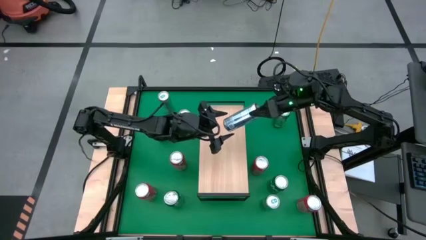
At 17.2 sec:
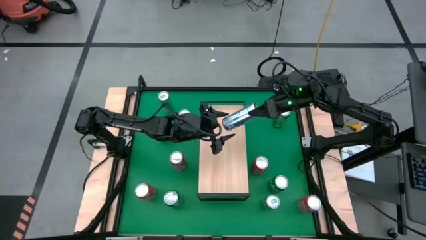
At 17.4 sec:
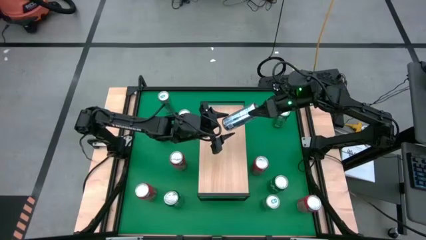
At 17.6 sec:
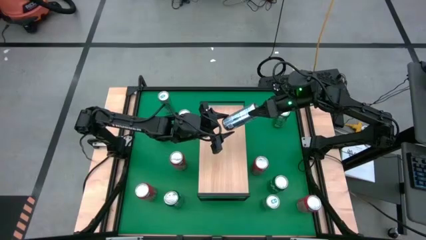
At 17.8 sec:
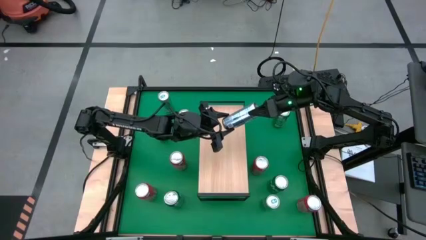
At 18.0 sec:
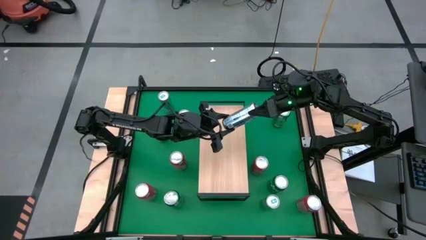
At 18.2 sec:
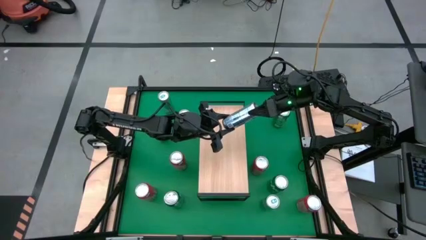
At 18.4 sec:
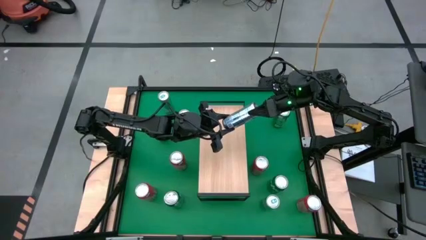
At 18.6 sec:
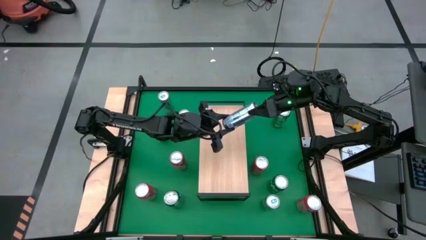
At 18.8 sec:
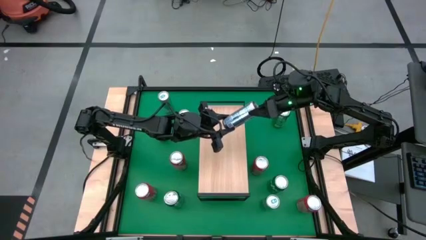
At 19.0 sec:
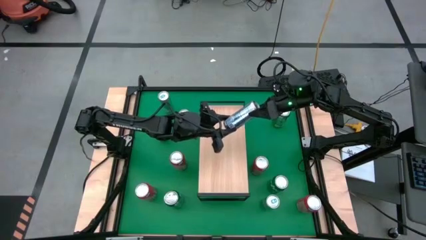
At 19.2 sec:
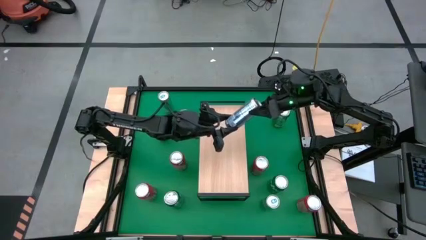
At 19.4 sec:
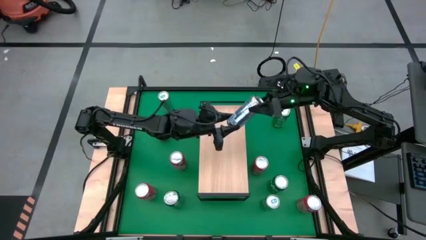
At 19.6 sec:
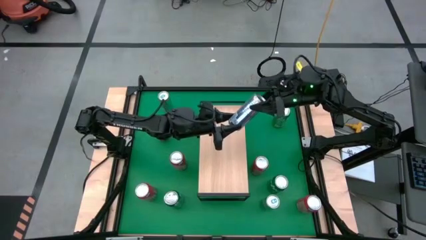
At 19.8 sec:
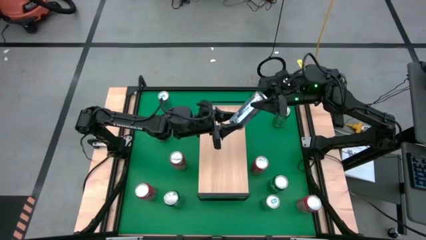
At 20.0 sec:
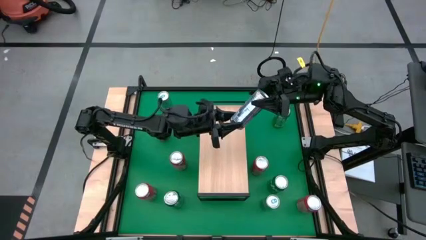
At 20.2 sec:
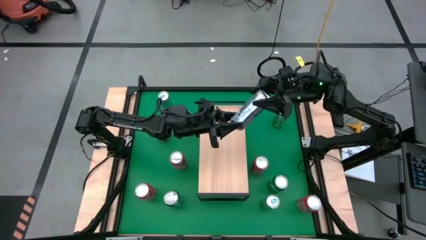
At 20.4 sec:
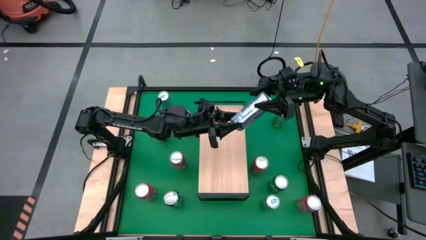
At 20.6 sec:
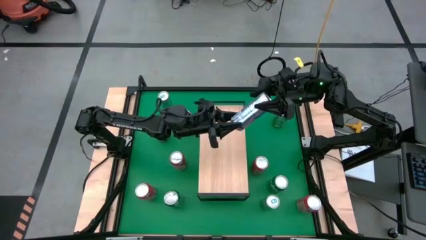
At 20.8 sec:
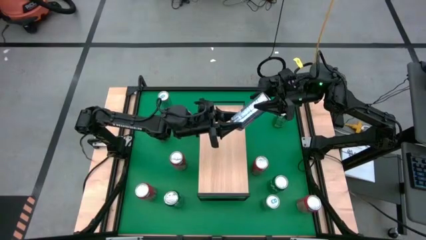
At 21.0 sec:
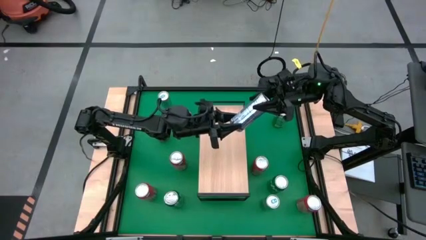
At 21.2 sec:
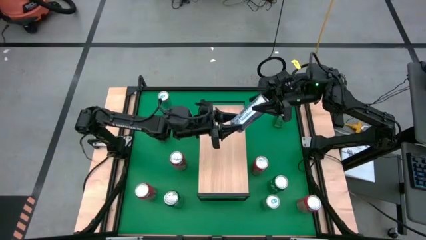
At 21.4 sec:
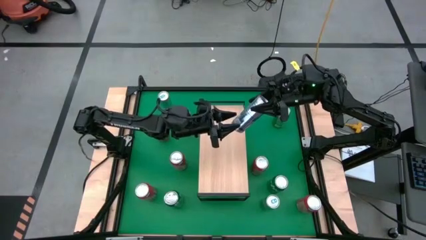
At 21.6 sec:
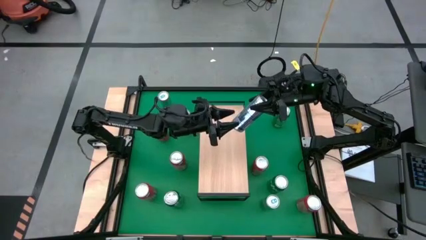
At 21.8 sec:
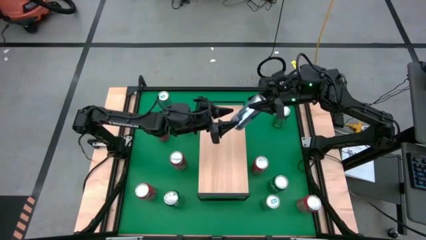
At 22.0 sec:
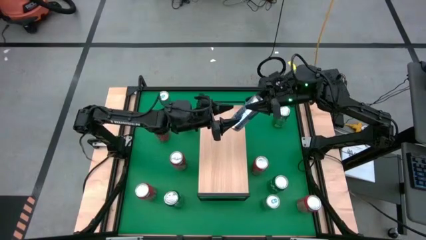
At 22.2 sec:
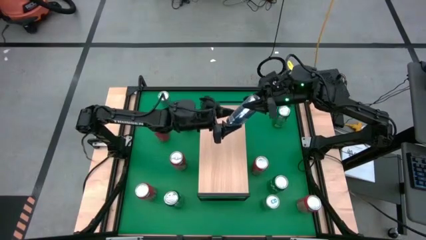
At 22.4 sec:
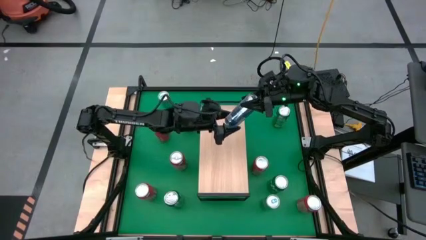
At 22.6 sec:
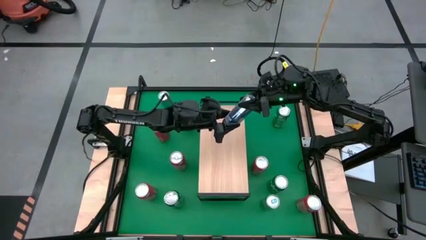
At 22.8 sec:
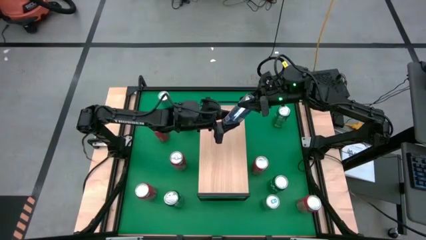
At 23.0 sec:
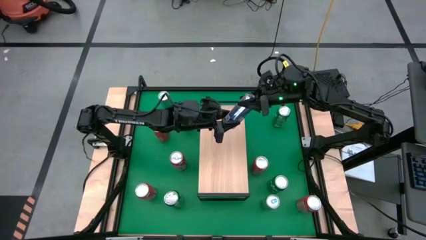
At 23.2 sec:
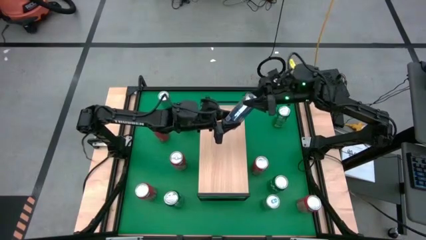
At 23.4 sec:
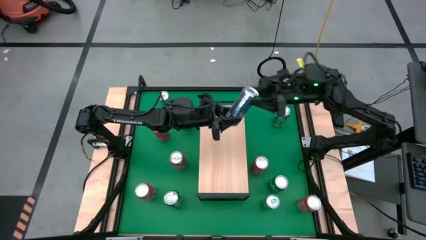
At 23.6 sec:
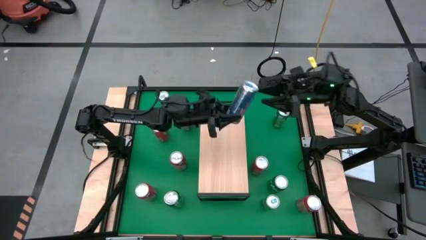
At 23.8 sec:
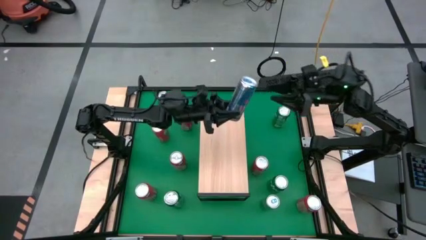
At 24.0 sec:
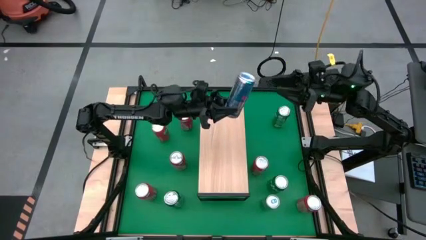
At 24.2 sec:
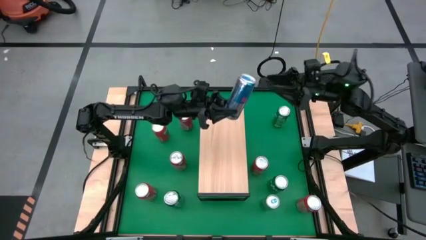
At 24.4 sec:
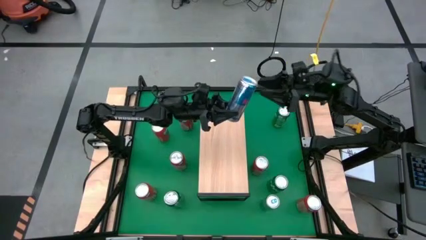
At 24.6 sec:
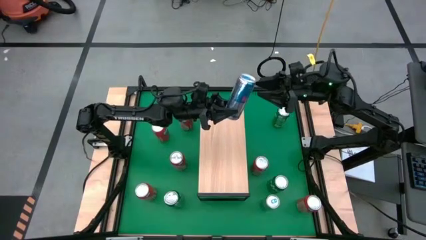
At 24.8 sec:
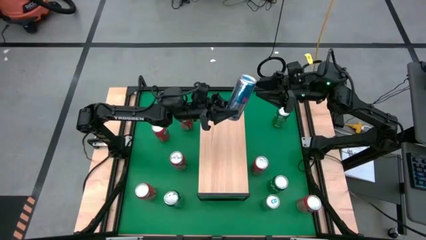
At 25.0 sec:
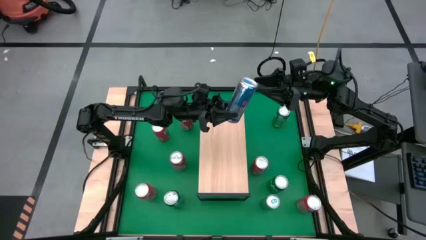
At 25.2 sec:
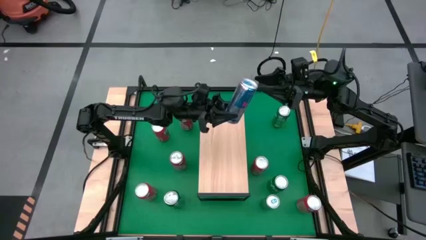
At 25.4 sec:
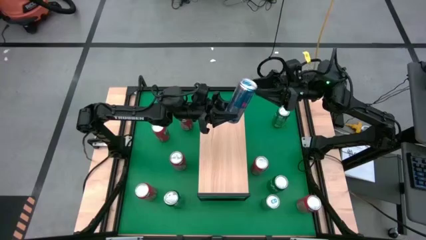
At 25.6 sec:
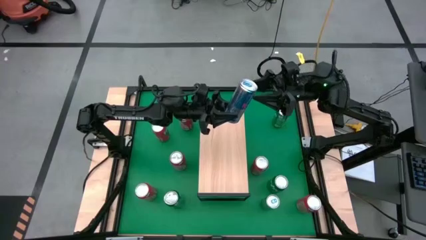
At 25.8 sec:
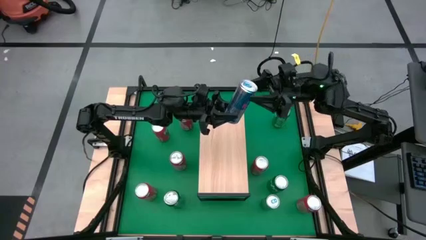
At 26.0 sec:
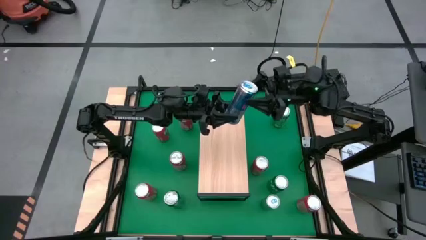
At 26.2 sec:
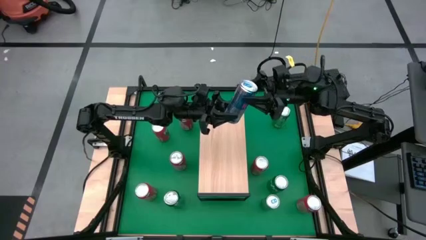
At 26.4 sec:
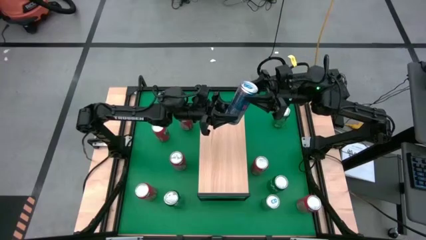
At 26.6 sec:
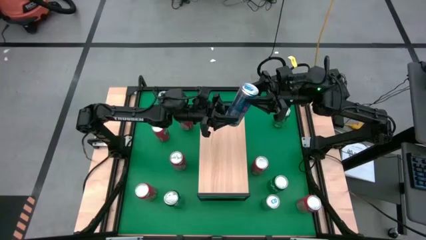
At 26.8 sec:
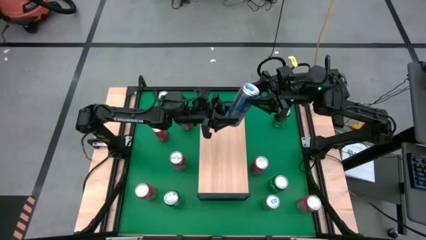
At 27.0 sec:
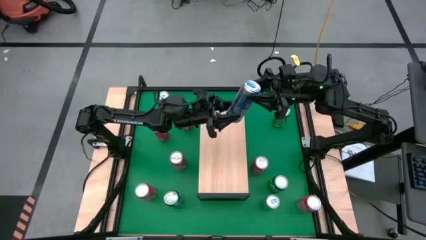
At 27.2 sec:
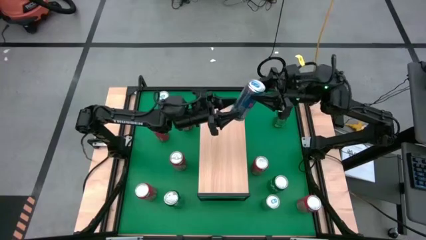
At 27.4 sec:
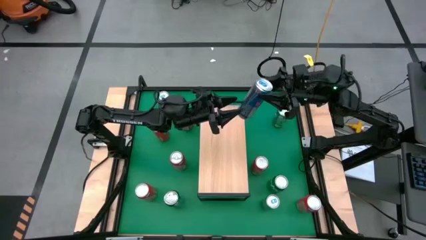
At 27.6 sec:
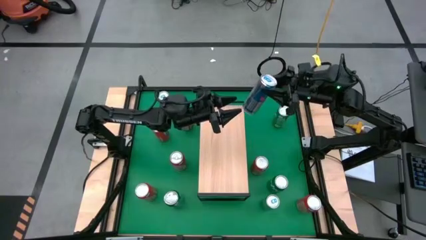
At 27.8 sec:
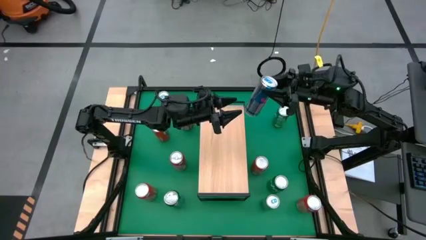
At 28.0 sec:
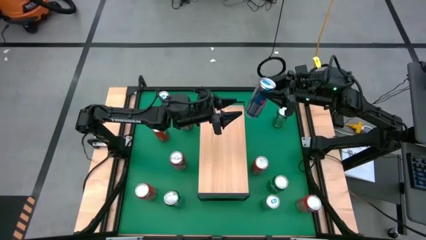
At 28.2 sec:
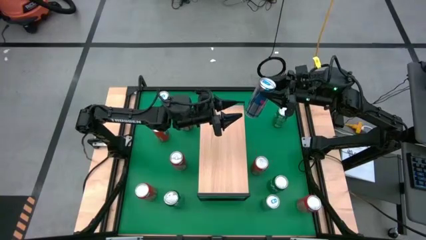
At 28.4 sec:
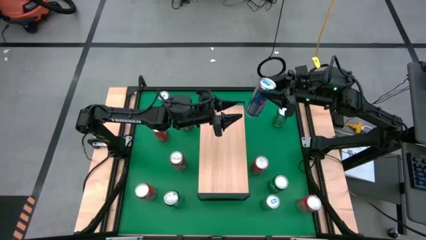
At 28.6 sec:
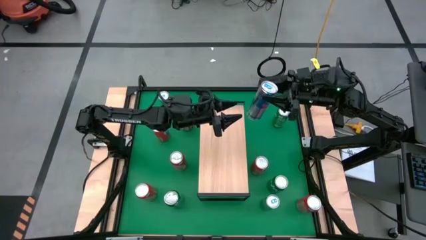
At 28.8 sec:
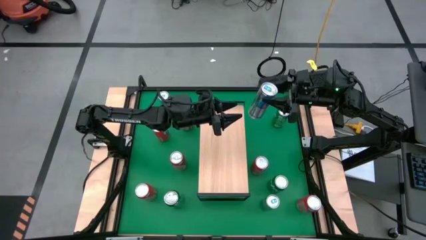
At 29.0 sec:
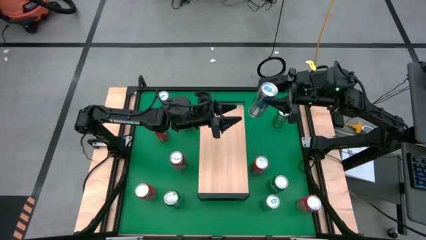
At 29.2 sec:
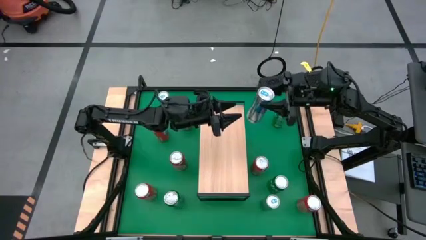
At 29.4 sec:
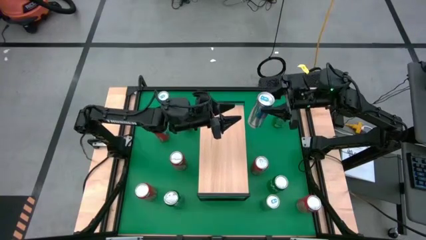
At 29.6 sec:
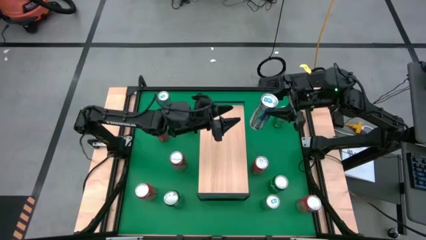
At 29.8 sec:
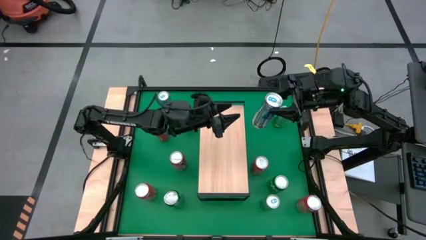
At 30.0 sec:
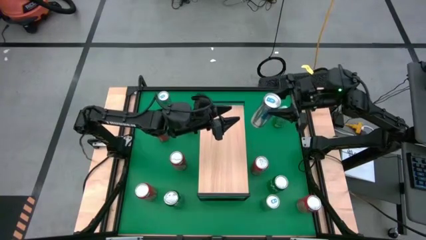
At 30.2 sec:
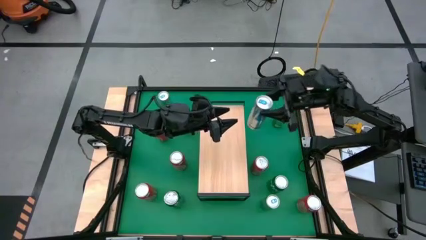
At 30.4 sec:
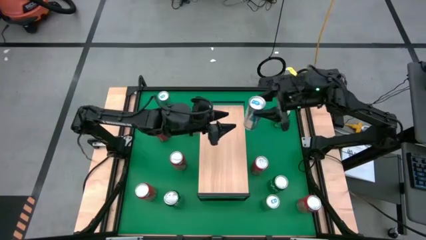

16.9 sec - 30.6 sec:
Task: Place canned beverage on shelf
Put the blue soda can on the shelf
